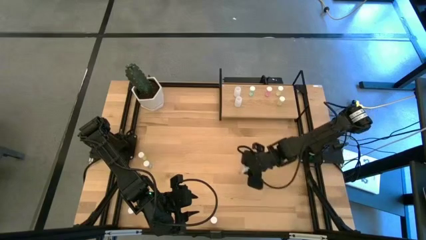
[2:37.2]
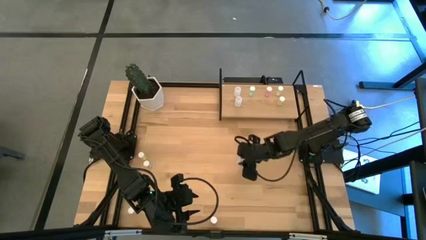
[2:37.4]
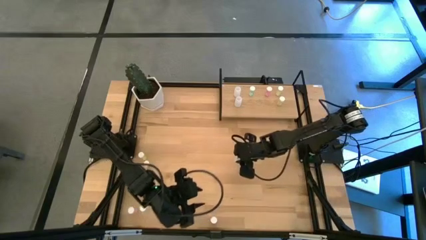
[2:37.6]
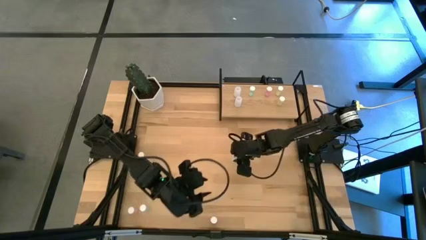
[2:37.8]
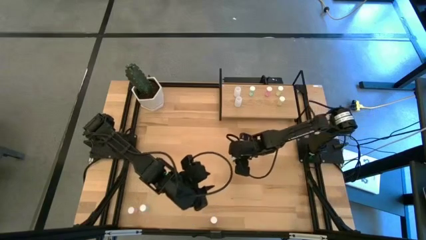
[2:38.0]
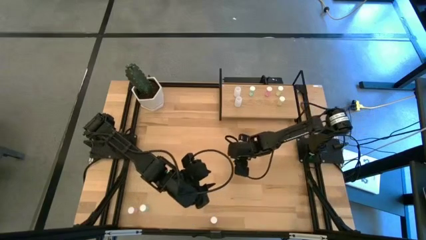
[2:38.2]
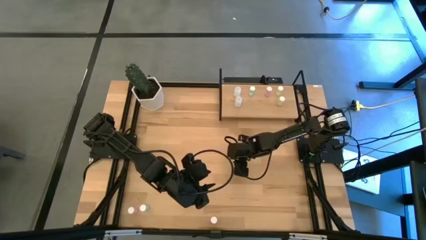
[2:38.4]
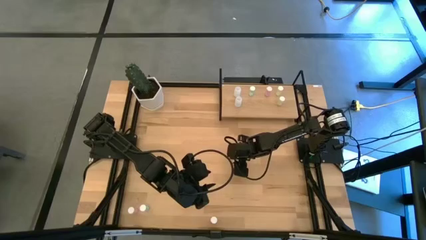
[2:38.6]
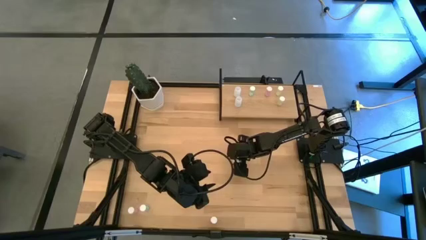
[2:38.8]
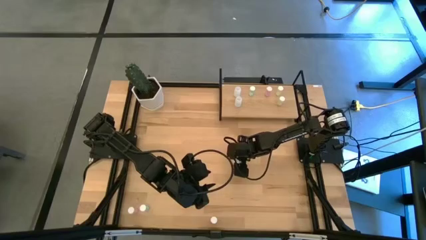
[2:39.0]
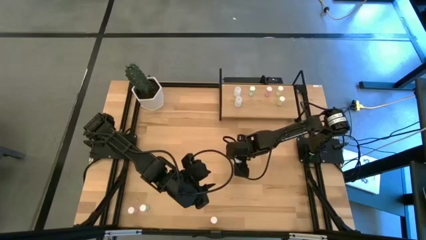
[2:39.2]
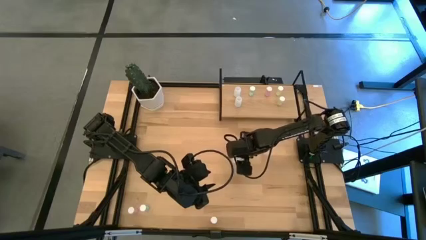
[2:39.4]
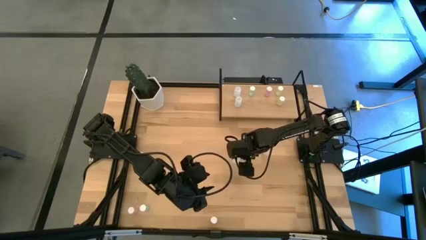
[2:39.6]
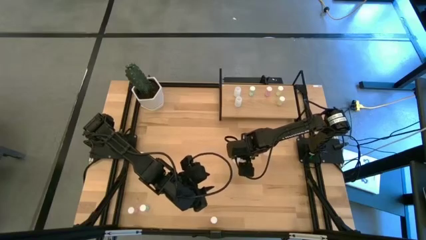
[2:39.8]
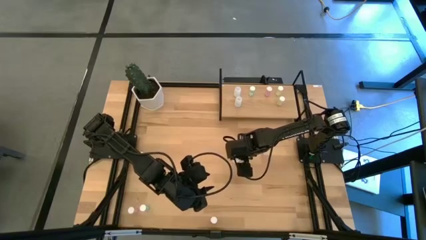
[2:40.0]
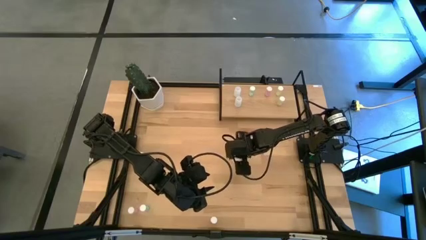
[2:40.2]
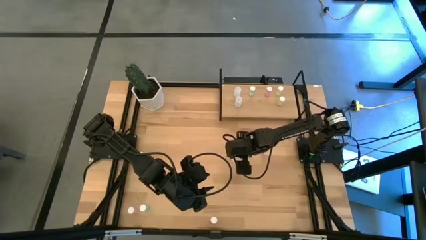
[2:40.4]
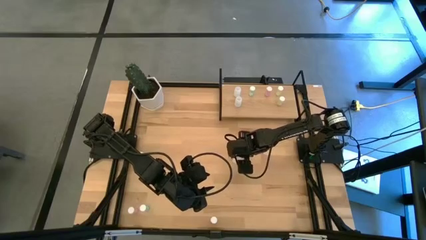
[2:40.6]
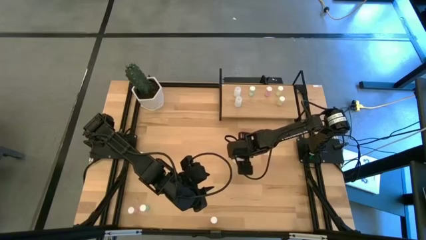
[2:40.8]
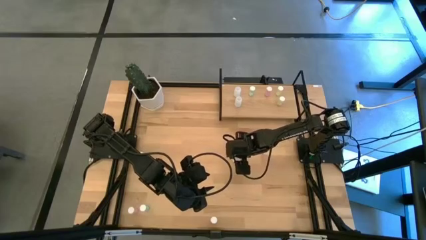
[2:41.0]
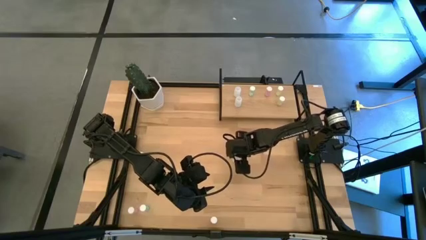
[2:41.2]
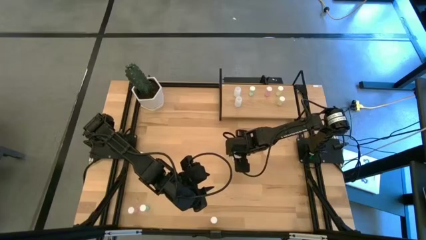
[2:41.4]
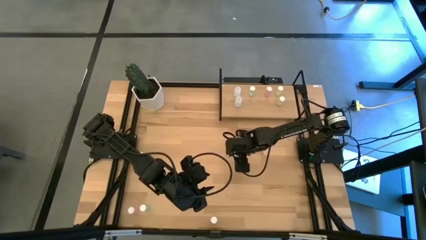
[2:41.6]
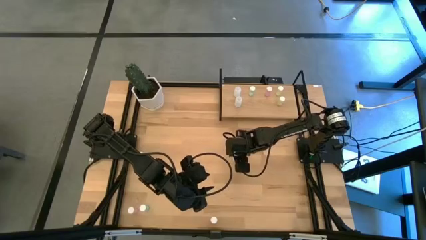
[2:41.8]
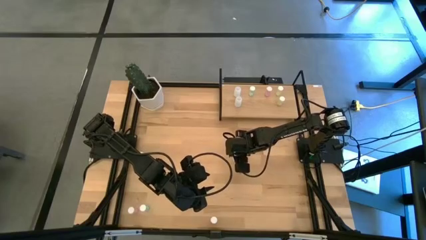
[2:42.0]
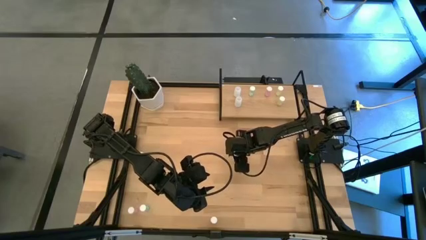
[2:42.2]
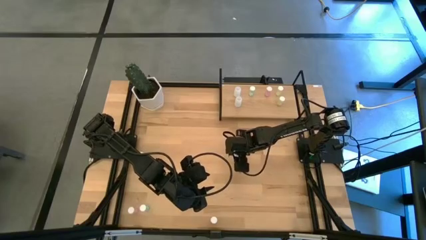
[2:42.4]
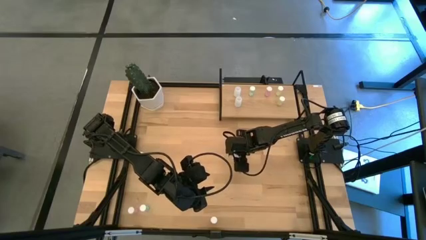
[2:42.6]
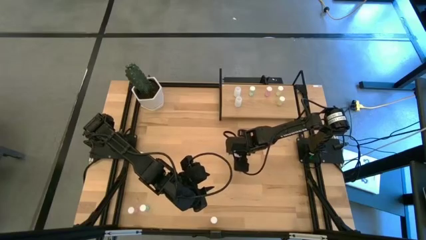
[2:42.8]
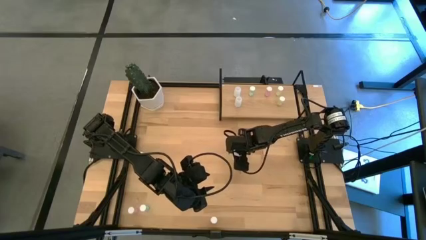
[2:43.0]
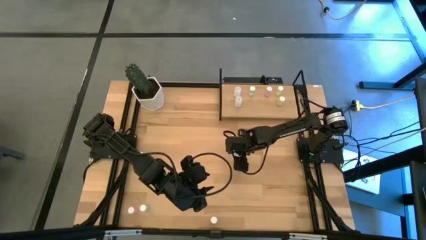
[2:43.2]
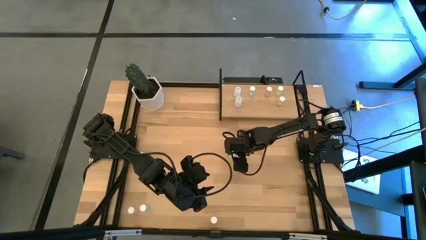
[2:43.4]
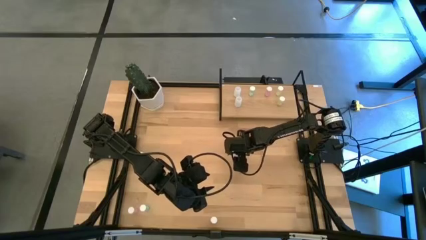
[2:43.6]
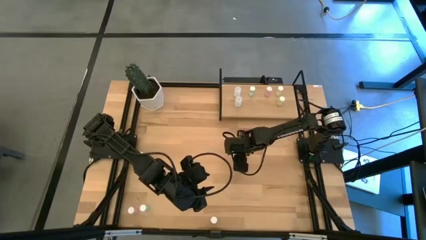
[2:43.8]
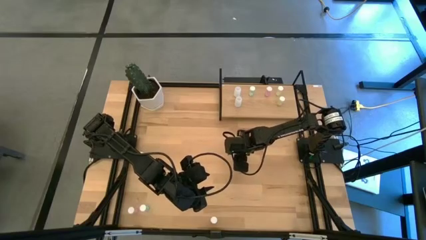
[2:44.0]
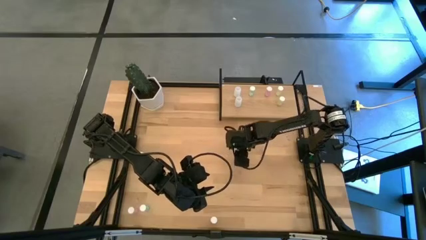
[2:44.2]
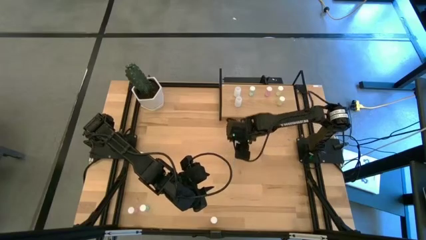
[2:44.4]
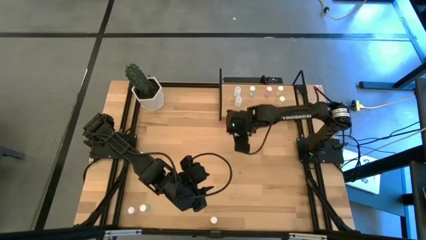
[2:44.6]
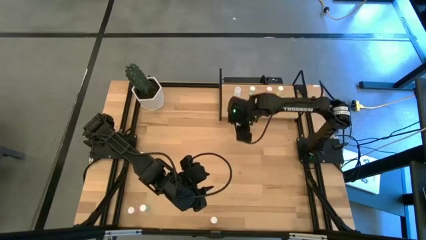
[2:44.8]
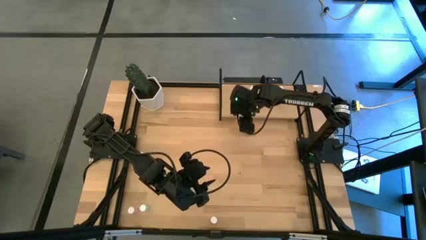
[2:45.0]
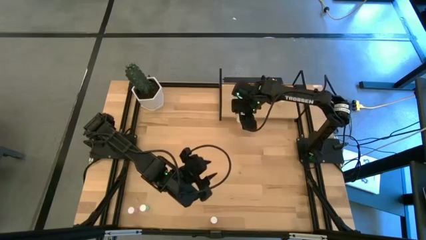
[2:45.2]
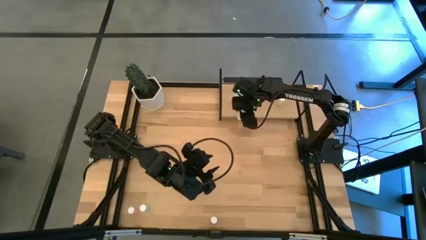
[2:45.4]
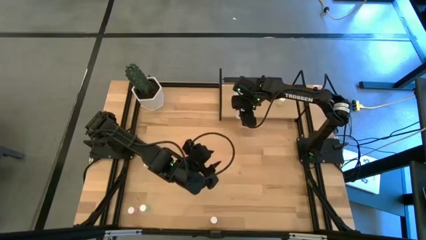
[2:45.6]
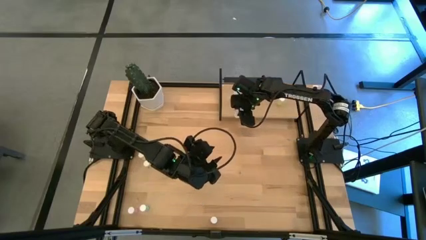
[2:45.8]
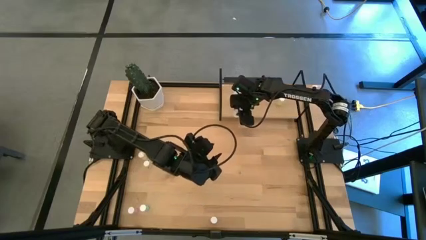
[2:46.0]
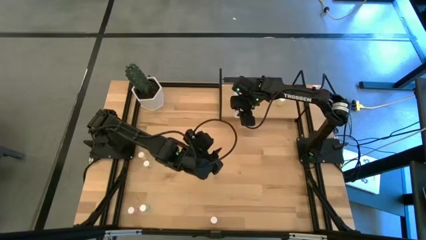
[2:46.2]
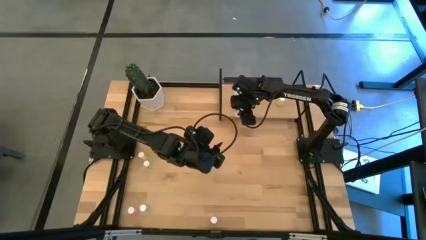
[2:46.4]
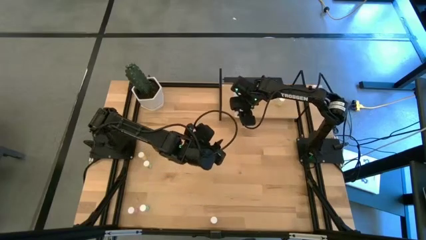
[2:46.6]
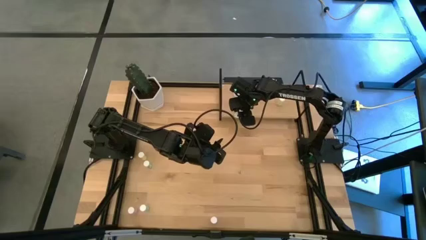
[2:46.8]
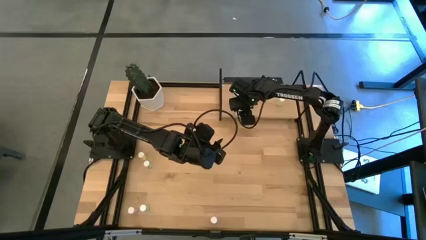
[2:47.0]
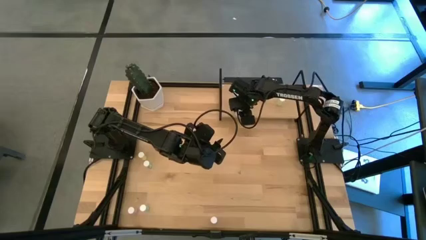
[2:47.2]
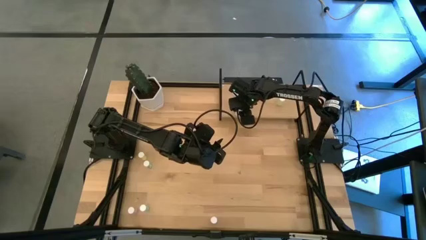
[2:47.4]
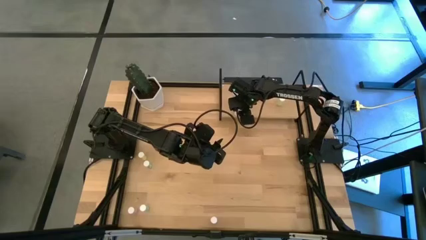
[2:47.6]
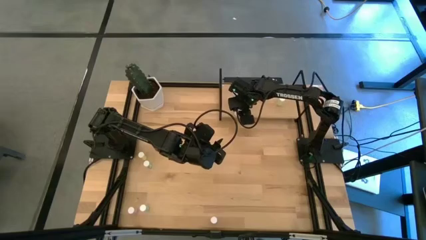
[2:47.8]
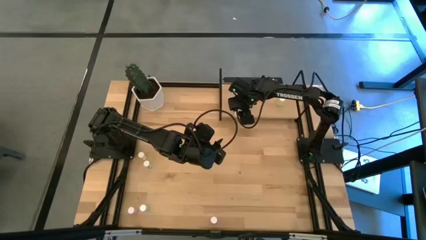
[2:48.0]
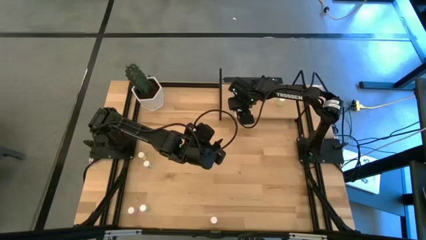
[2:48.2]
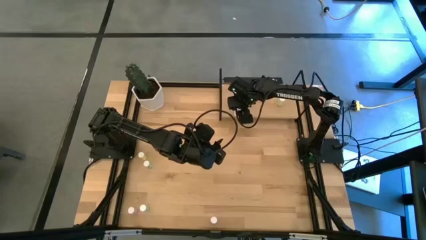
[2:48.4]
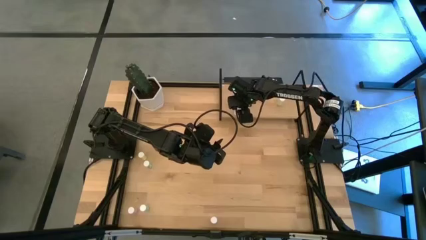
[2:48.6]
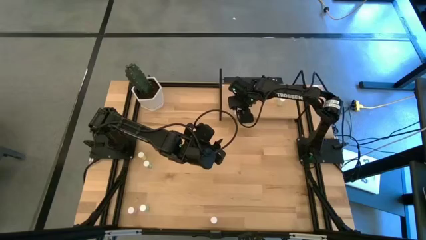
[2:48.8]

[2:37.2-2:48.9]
Task: Pick and place medicine bottles onto shelf by color
Put the transparent pill bottle on the shelf aligned with the other transparent pill bottles

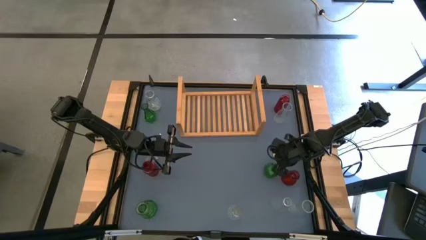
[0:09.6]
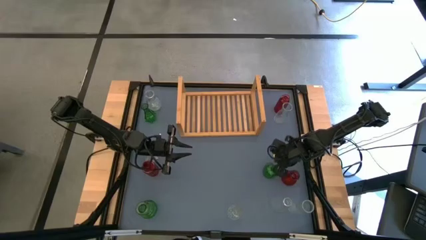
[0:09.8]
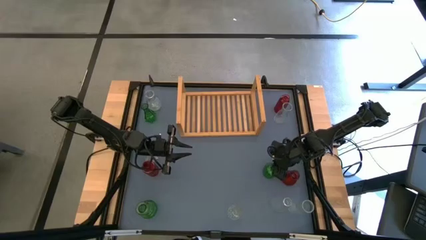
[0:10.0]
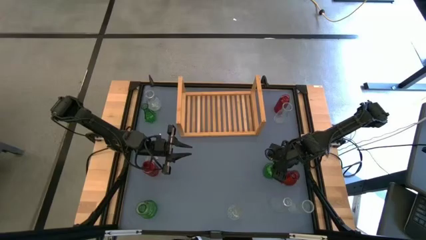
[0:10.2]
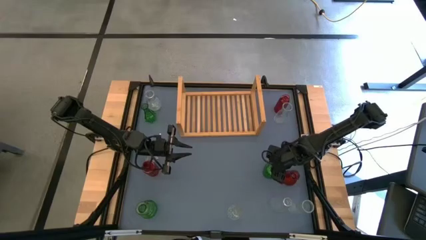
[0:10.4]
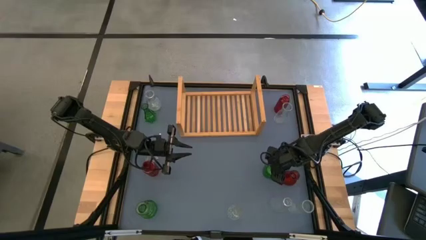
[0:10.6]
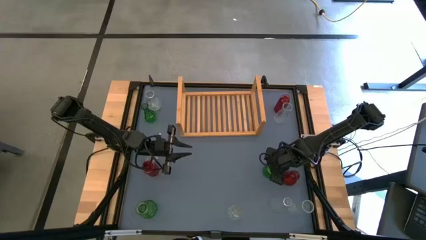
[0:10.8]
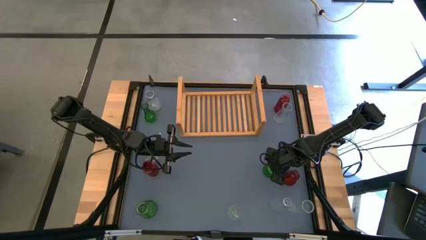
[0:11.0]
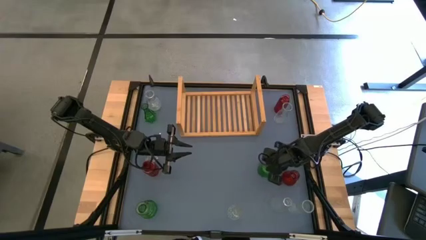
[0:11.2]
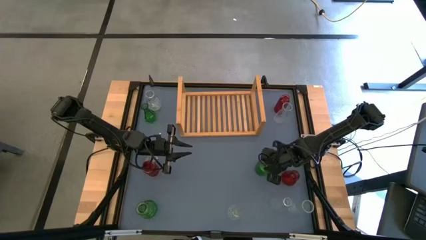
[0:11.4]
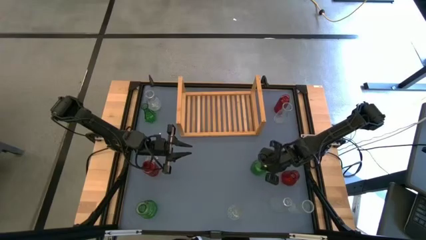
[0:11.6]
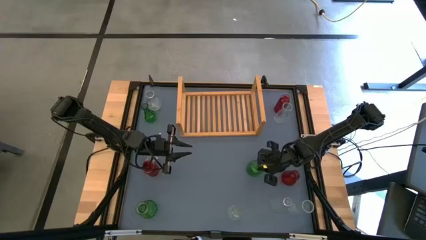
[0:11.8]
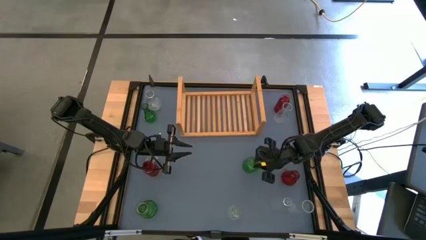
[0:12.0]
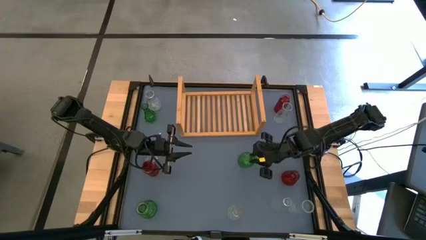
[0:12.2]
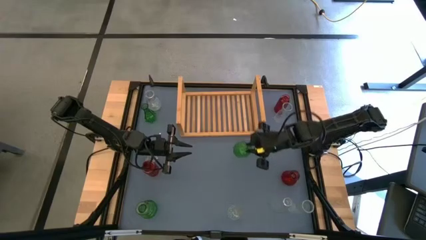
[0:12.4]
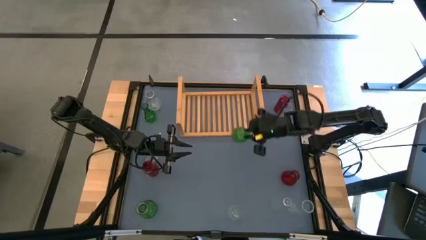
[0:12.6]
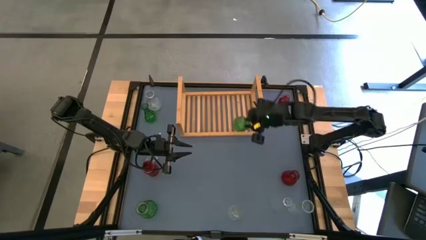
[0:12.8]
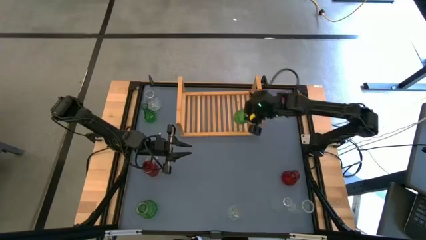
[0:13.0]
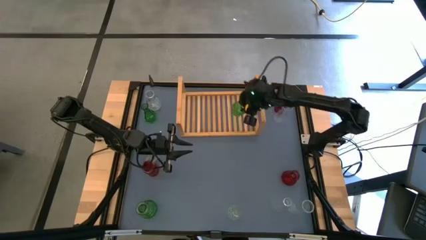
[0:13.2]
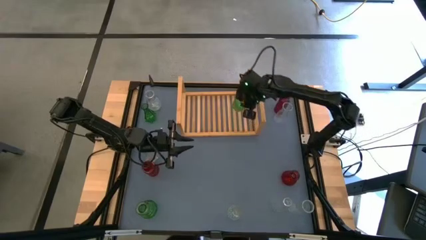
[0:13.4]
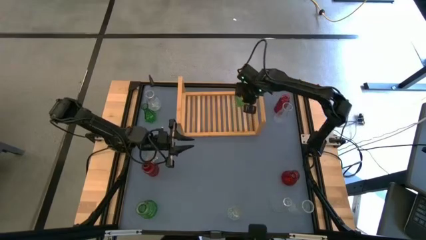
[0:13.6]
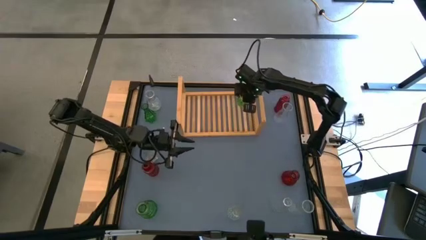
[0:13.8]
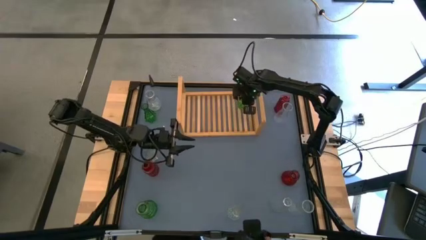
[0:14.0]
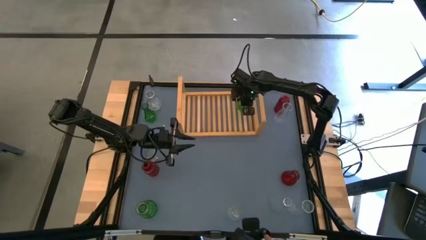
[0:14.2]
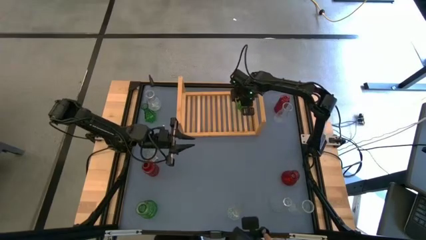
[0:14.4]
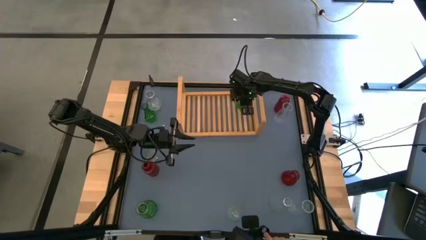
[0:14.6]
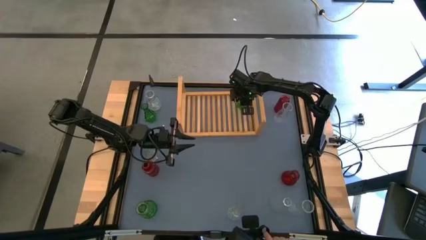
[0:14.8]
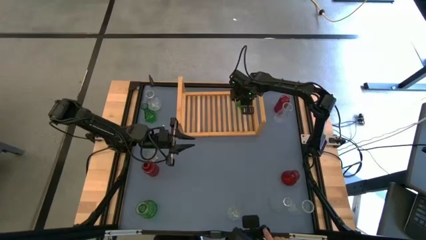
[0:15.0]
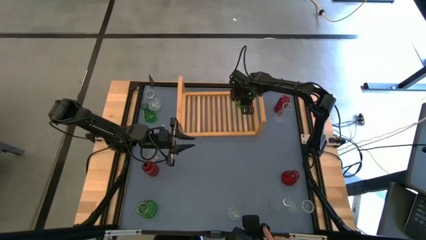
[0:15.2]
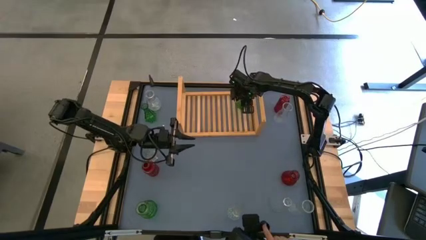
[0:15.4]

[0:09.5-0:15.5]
Task: sort vases onto shelf
Put the green vase on the shelf
